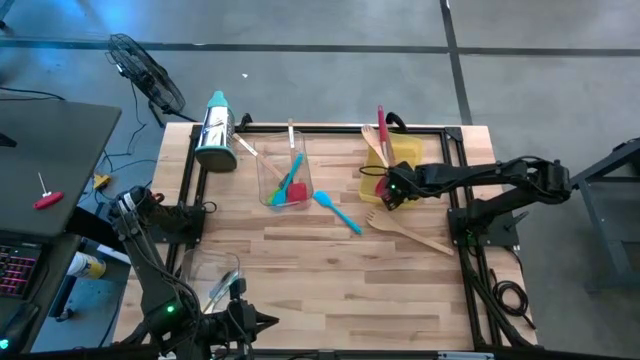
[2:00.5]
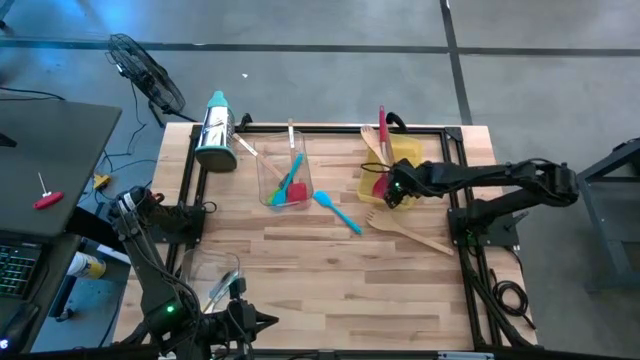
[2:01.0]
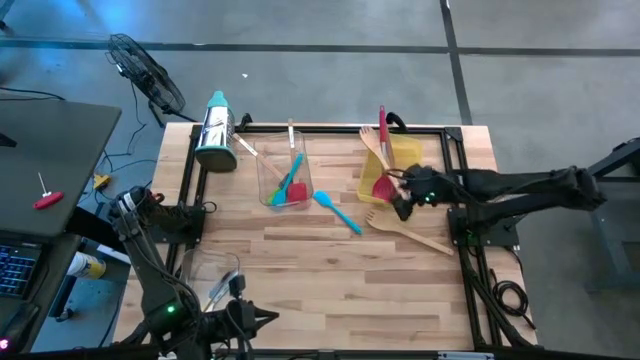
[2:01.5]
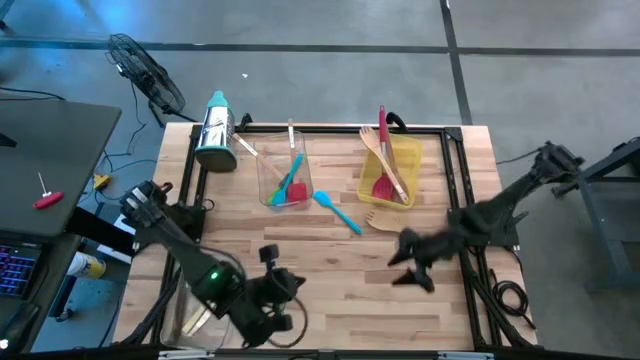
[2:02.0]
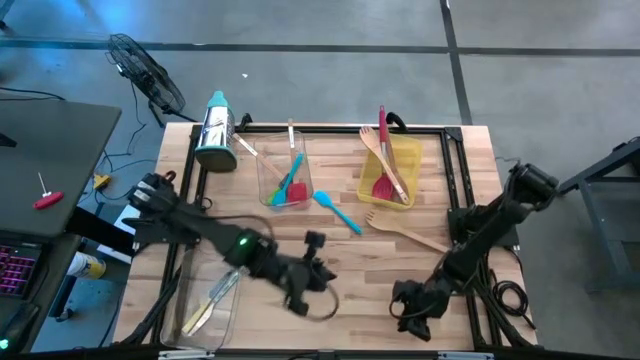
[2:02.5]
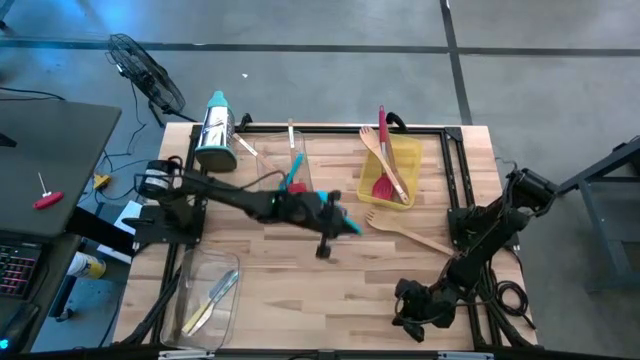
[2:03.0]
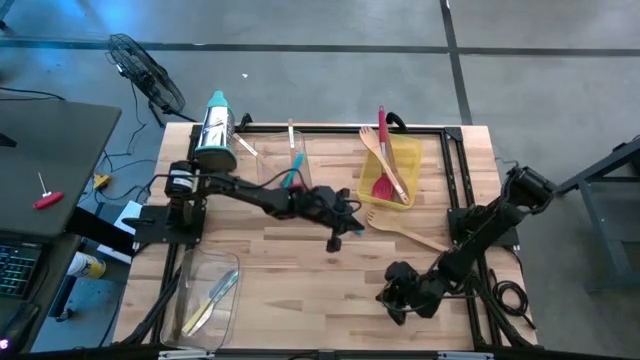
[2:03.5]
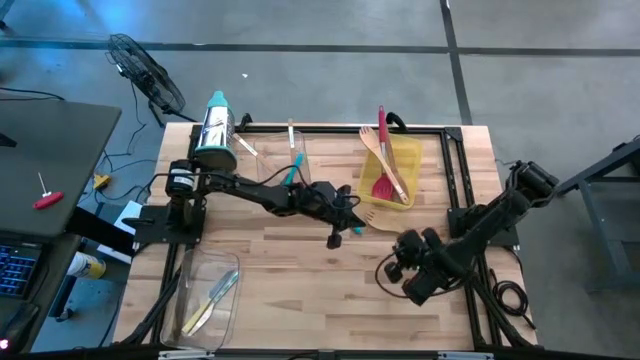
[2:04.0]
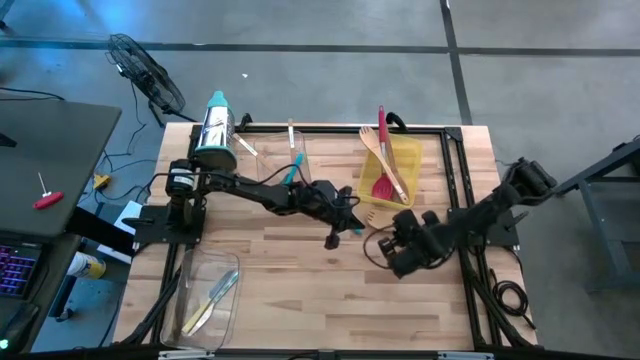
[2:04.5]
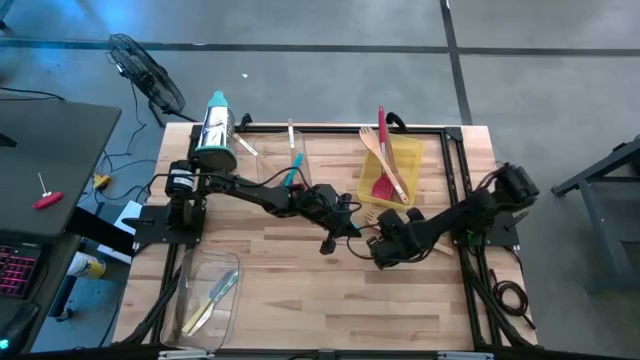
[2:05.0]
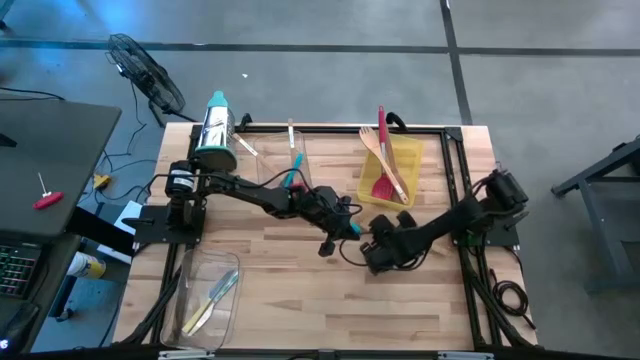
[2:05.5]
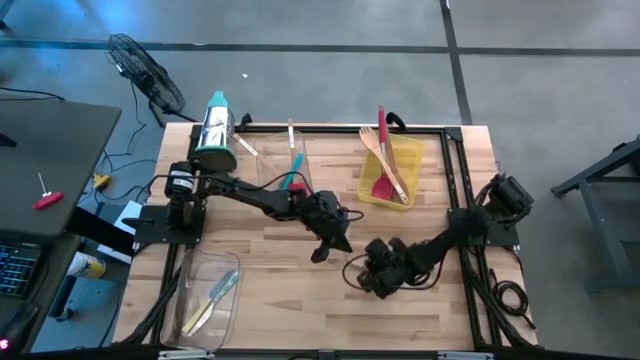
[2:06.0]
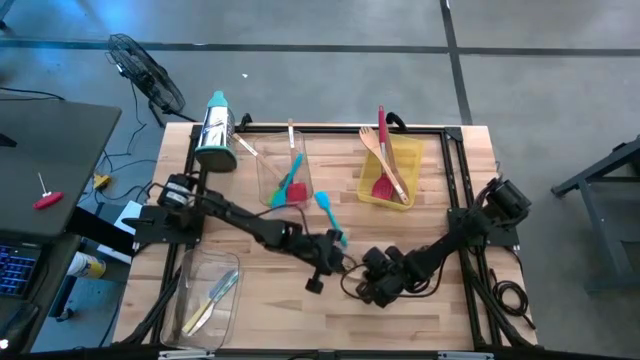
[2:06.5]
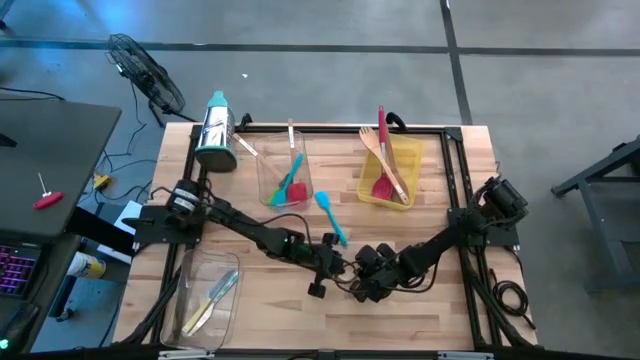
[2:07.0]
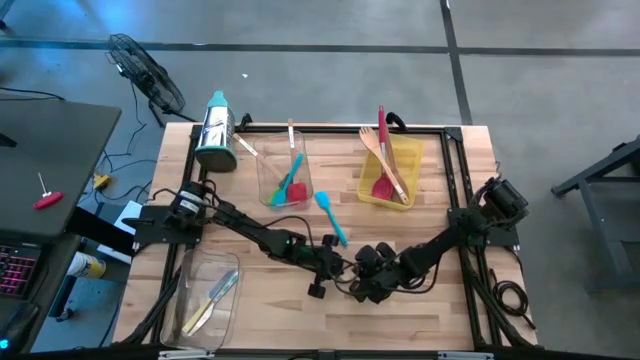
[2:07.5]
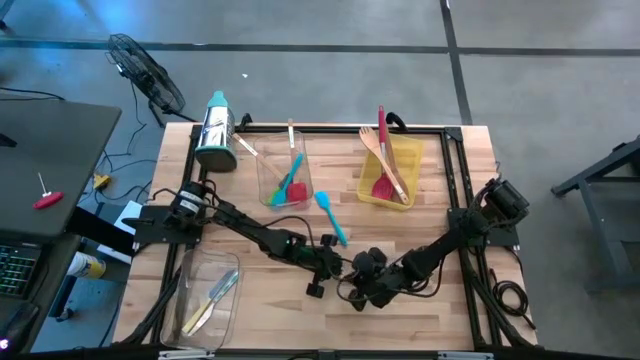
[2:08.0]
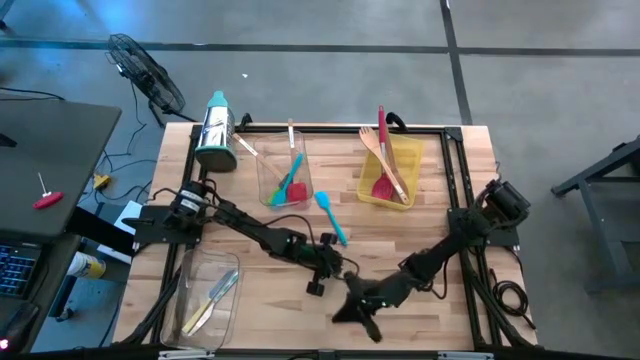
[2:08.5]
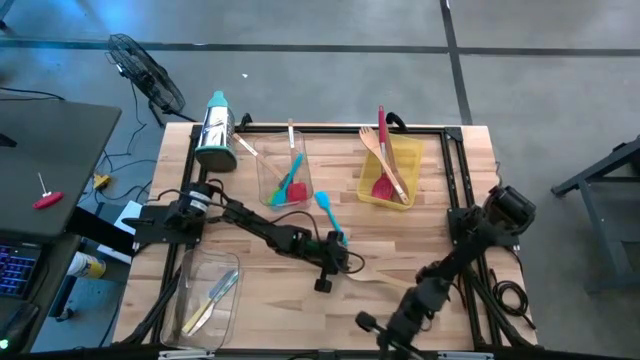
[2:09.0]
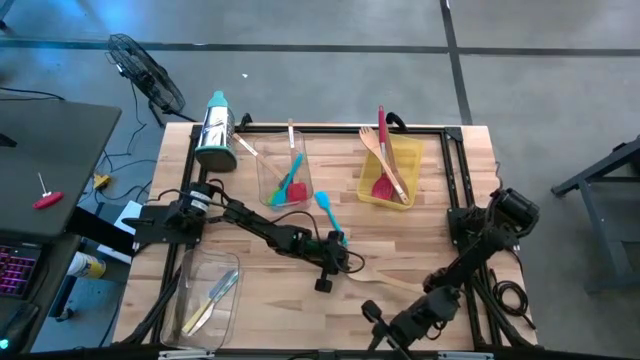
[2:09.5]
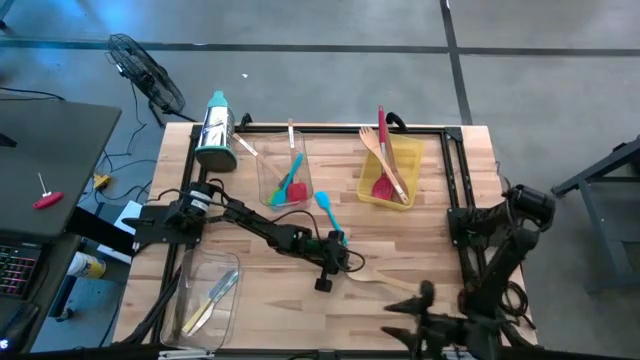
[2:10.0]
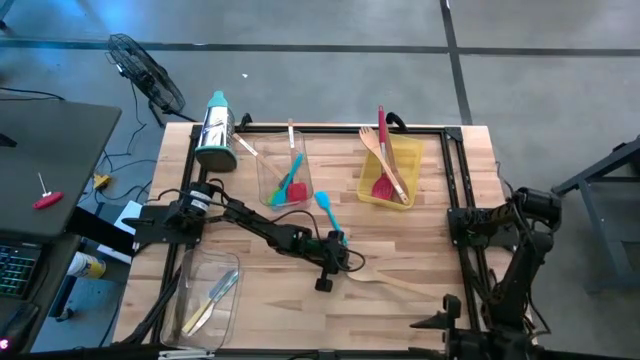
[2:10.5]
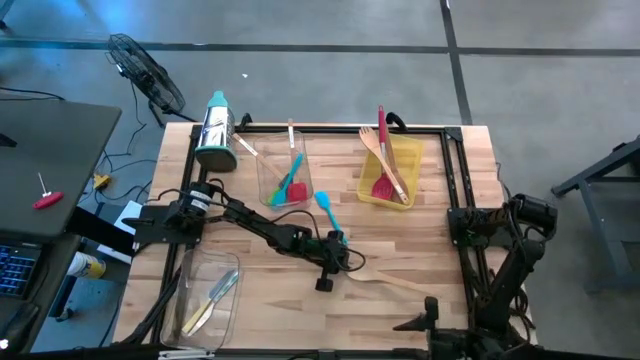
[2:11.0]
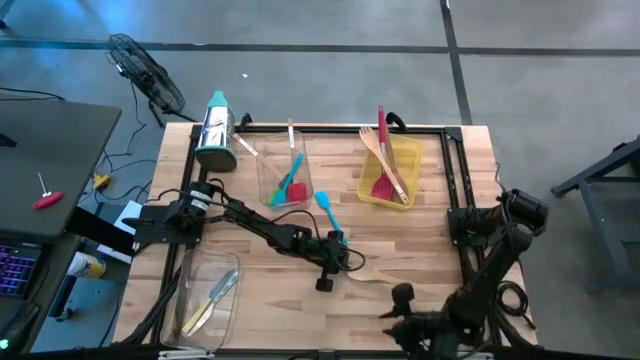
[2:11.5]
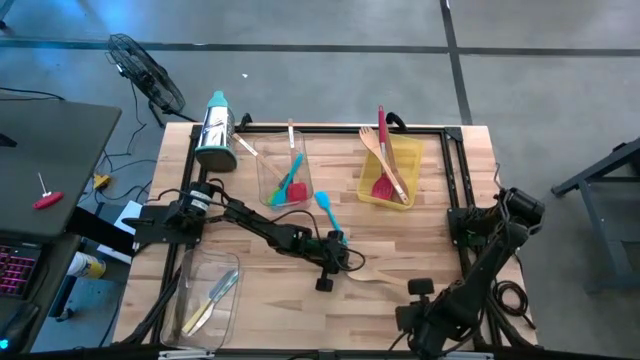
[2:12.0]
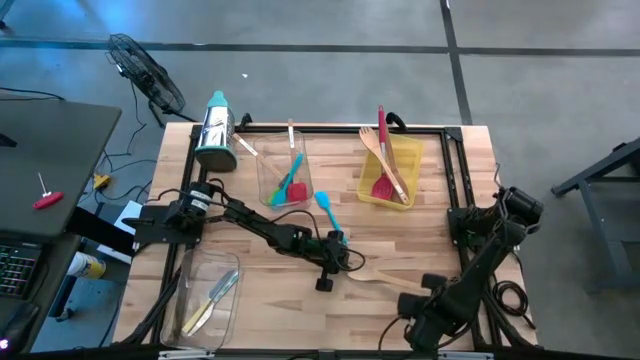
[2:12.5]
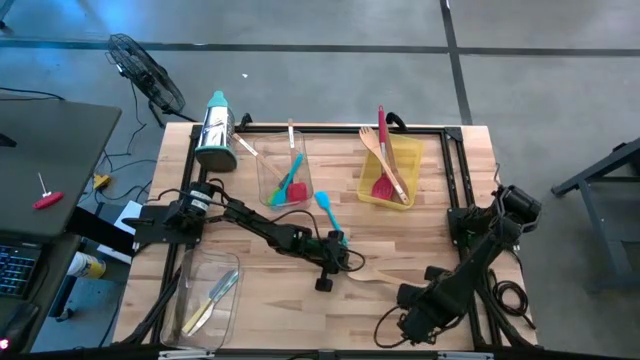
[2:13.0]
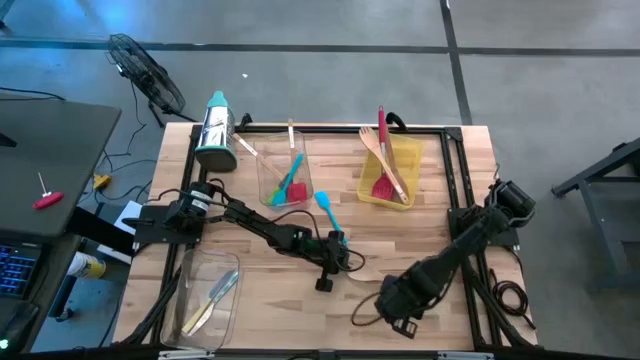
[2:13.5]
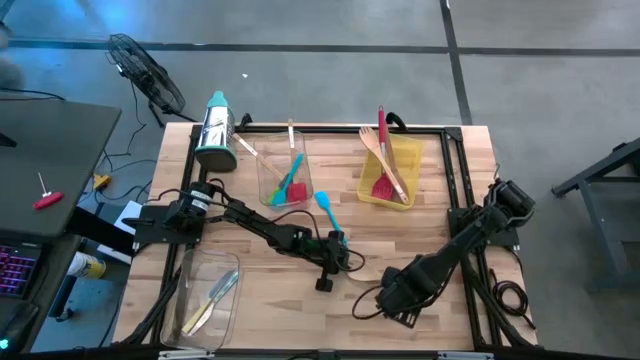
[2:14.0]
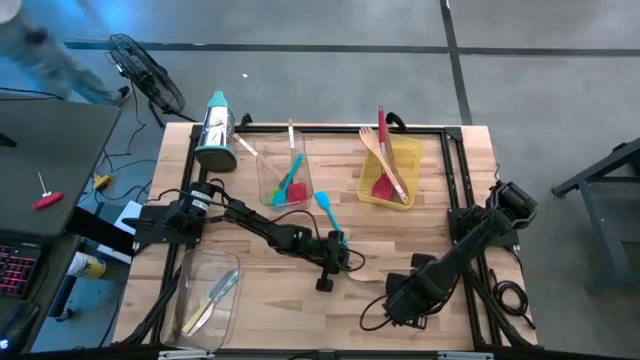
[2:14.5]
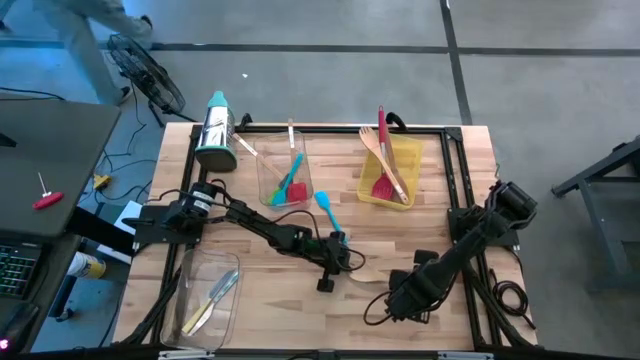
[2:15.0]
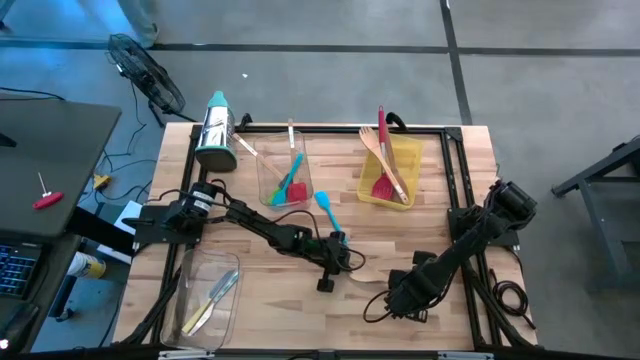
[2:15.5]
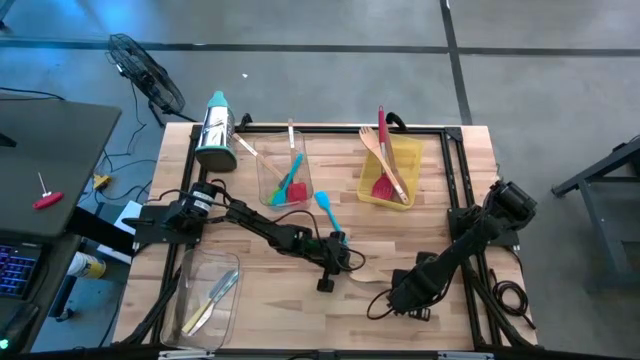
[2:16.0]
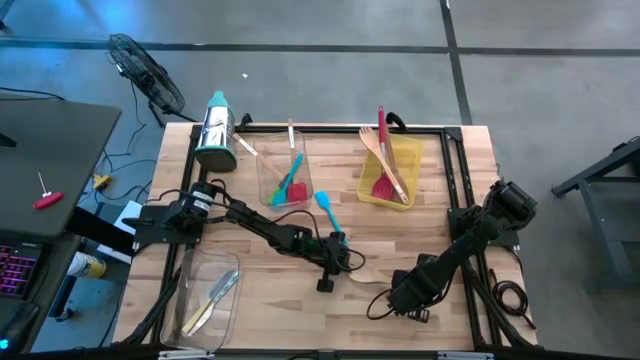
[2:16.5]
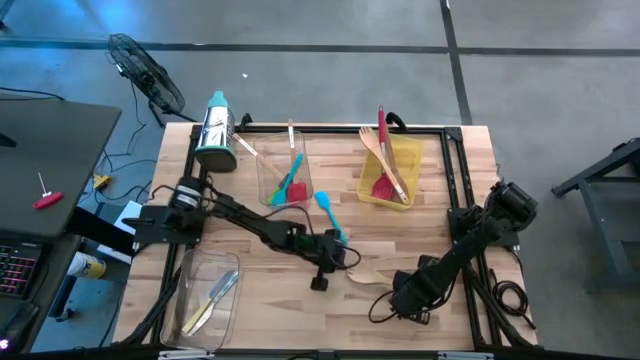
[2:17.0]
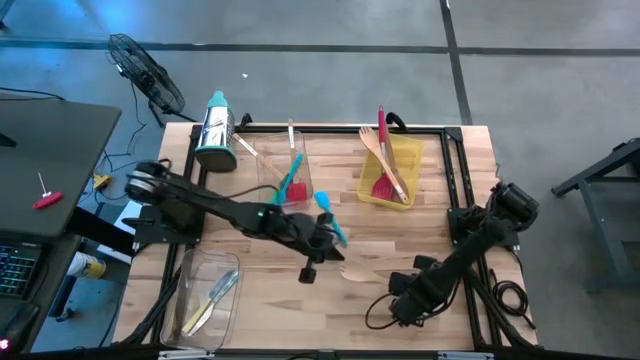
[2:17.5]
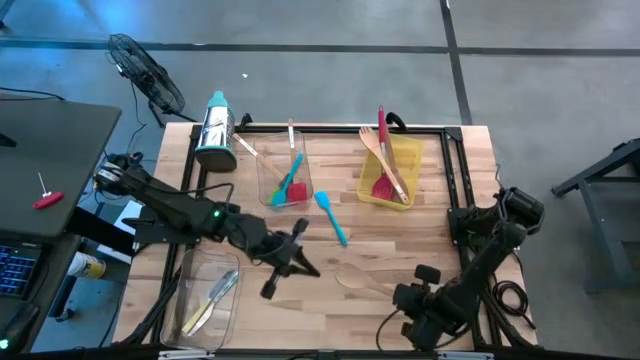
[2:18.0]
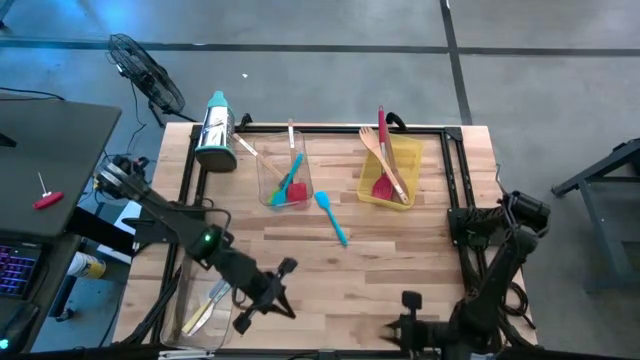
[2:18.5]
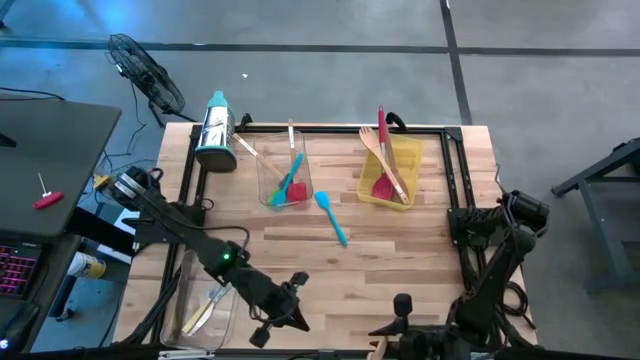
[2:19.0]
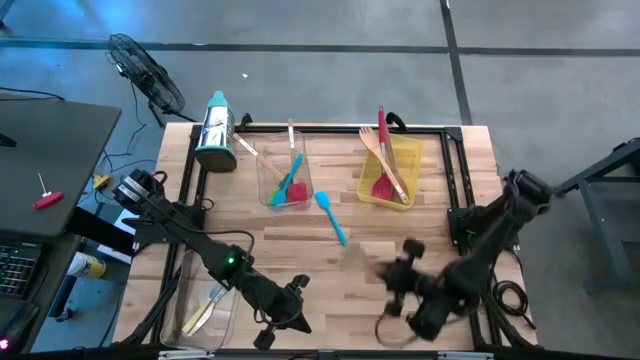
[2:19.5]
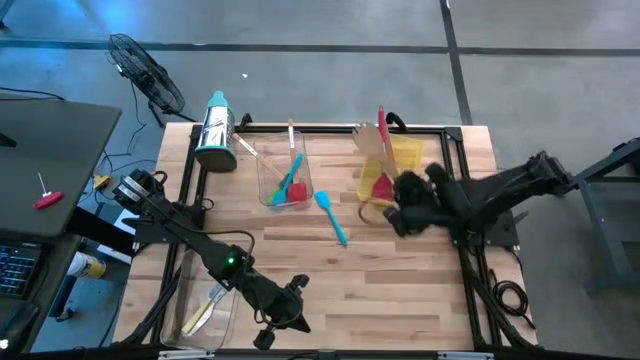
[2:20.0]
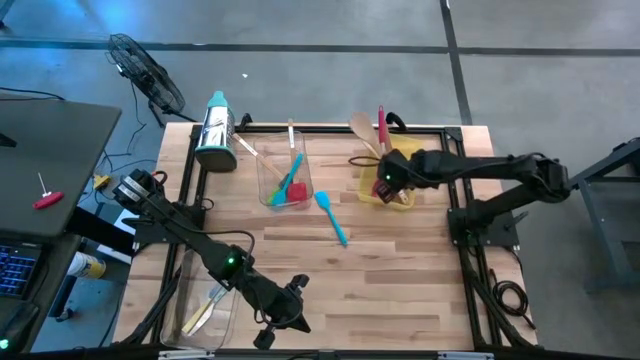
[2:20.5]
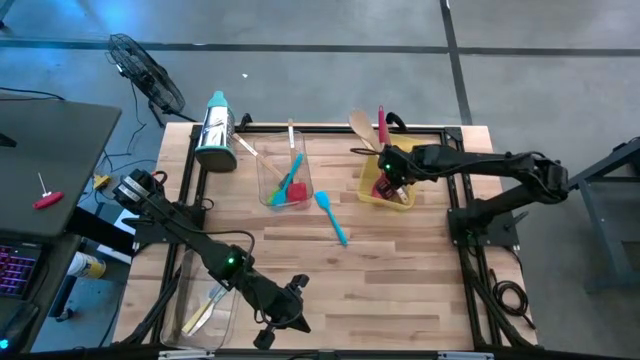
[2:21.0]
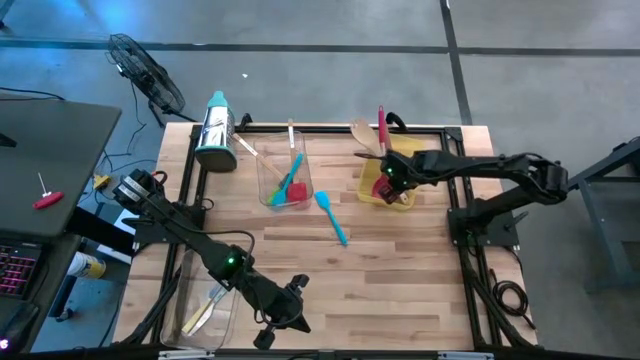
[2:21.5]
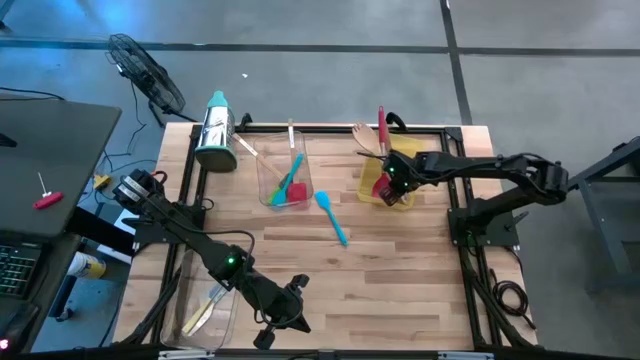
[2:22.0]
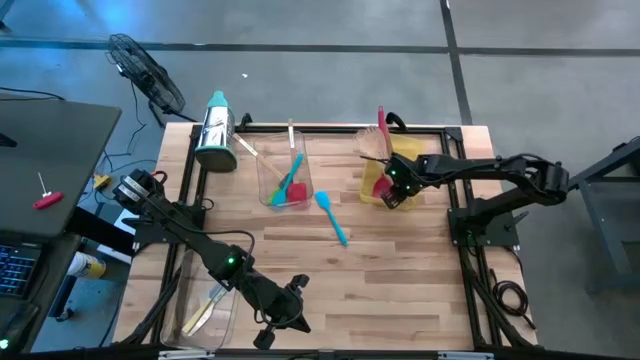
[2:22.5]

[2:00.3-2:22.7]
Task: Pick & Place Kitchen Items
Put the light brown wooden serving spoon into the yellow bin
